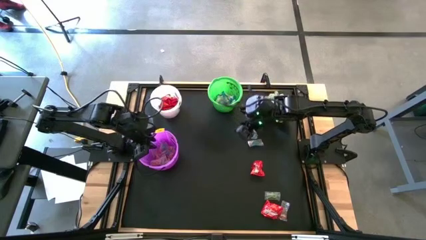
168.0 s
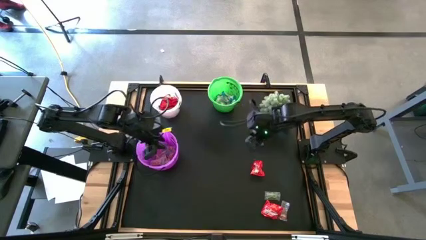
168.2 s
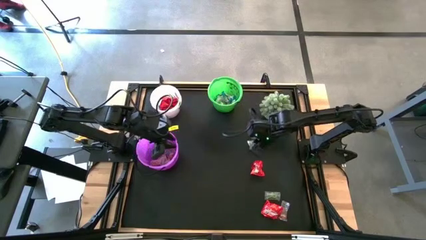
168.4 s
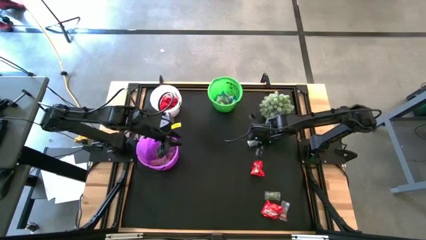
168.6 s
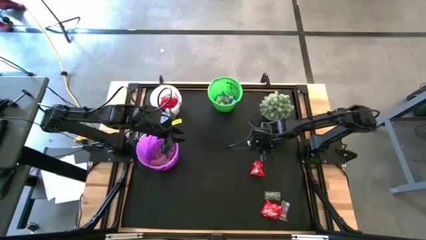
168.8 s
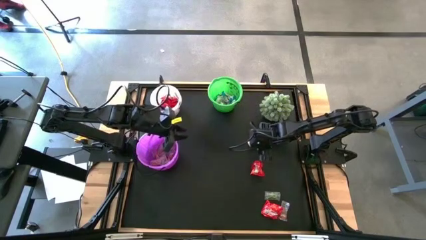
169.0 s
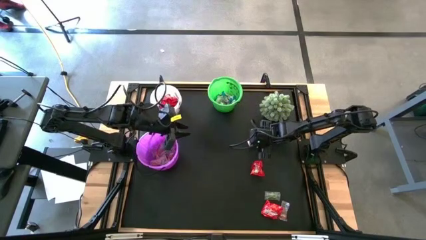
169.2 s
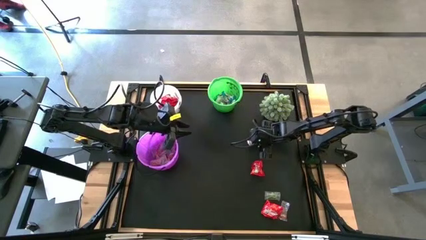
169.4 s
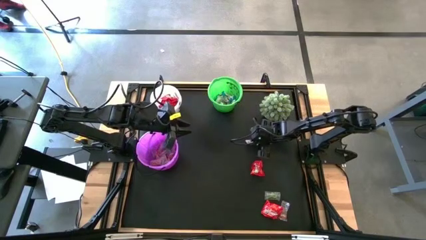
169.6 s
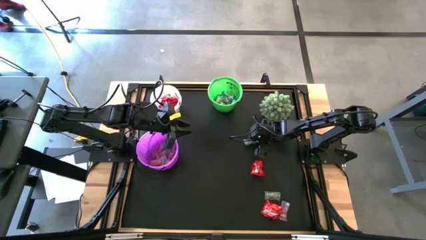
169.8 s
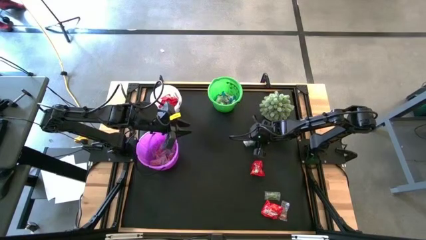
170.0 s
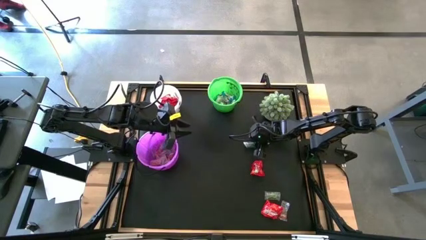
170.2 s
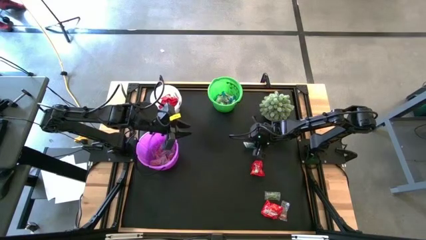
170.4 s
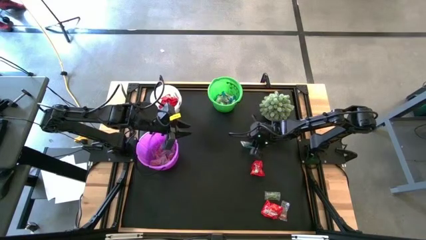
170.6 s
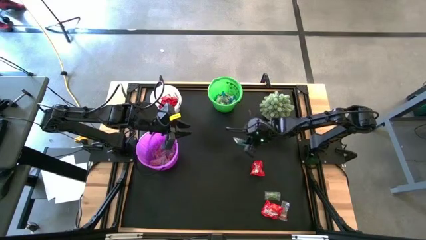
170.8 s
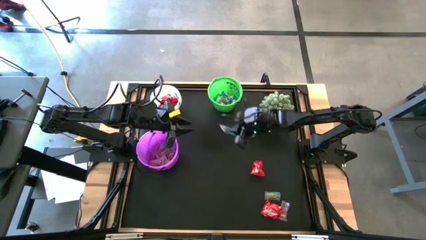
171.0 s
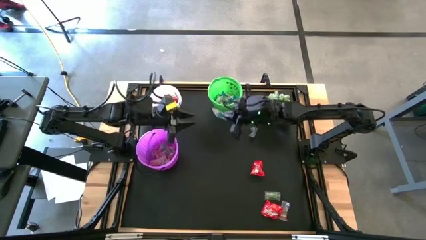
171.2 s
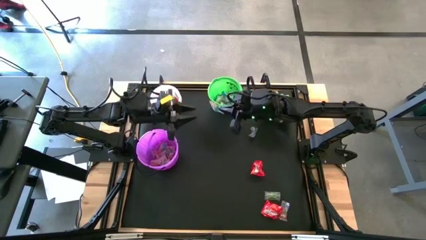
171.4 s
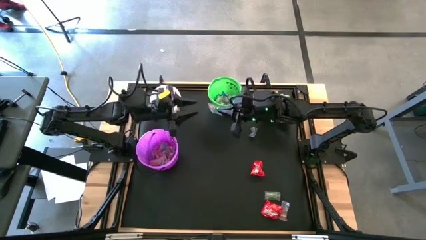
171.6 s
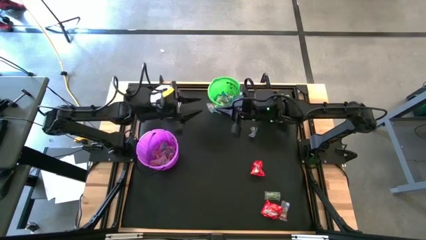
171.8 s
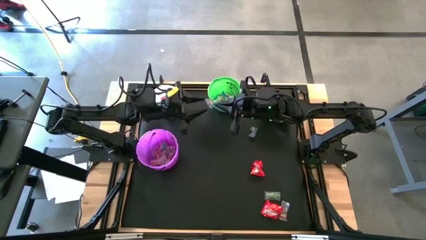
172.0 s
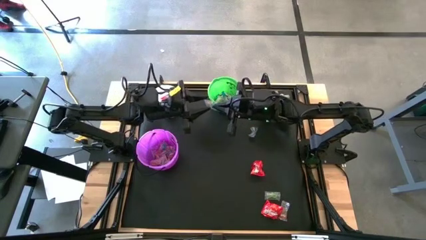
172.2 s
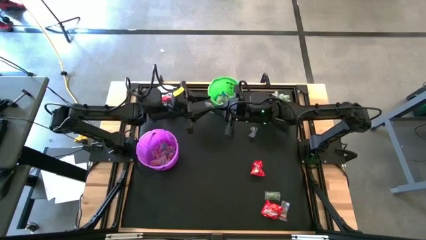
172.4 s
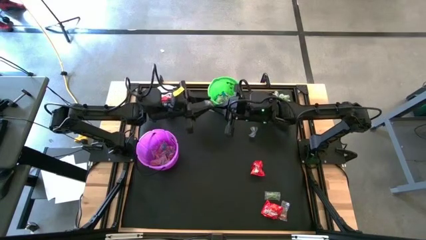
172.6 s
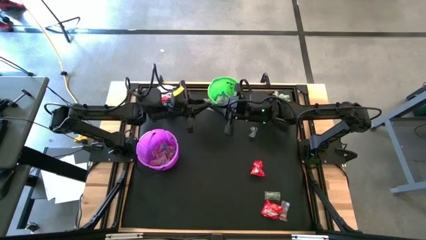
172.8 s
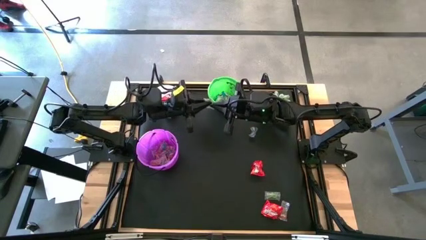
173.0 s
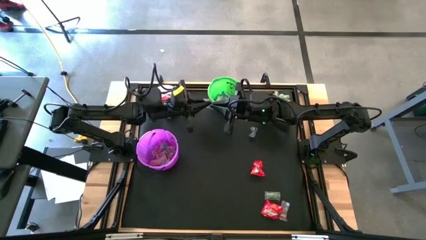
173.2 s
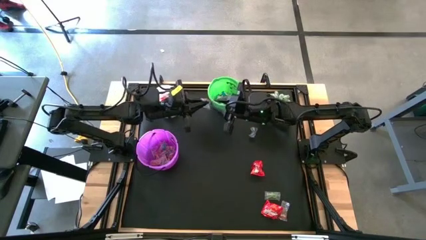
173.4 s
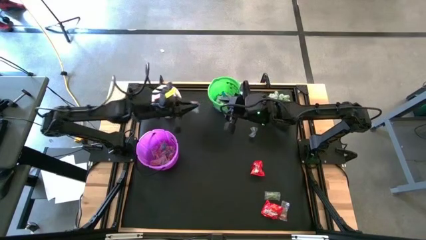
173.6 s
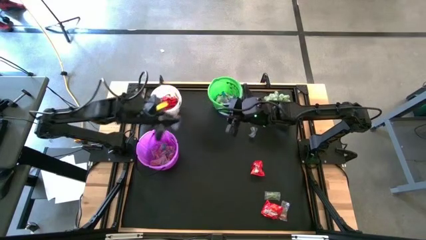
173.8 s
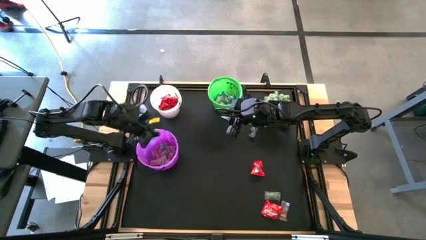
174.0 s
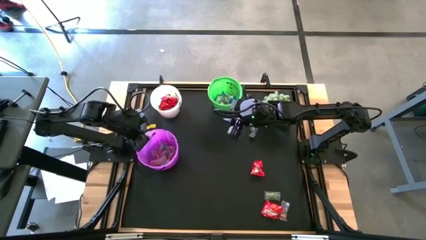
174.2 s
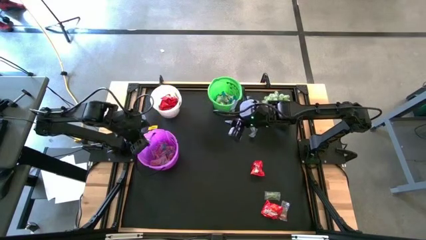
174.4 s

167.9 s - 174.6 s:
Task: Sort candy
Put the blue gummy into the violet bucket

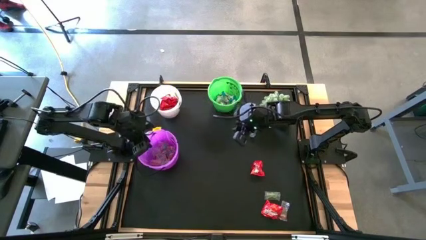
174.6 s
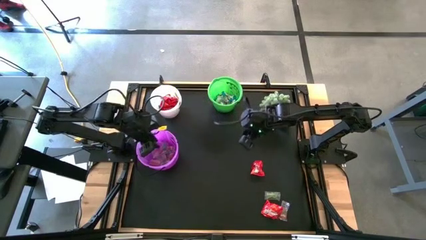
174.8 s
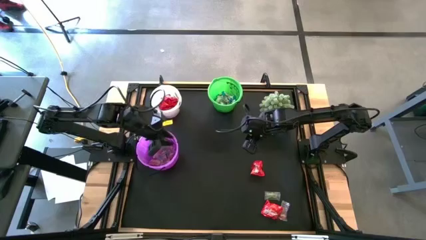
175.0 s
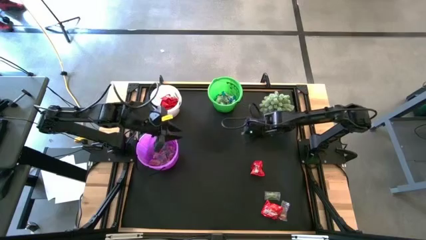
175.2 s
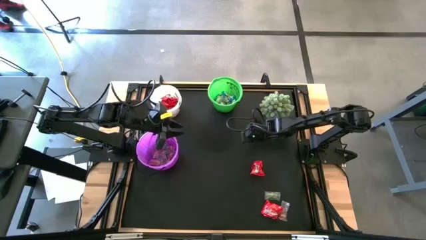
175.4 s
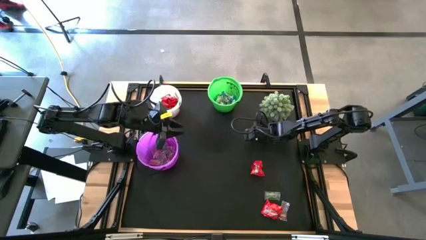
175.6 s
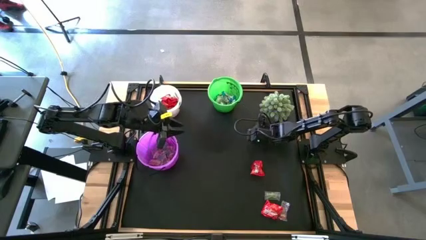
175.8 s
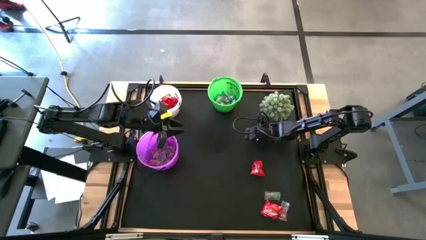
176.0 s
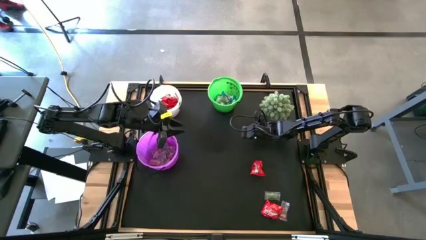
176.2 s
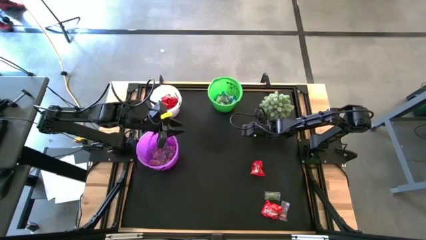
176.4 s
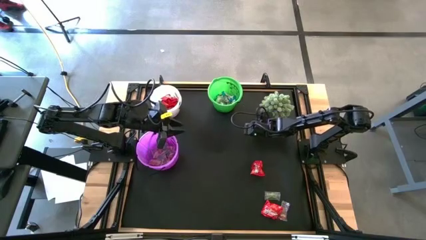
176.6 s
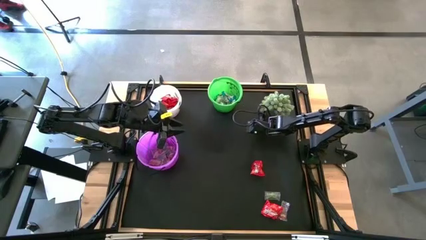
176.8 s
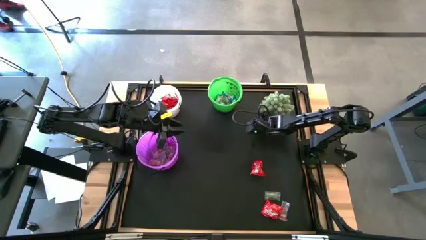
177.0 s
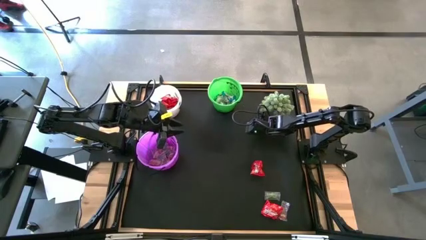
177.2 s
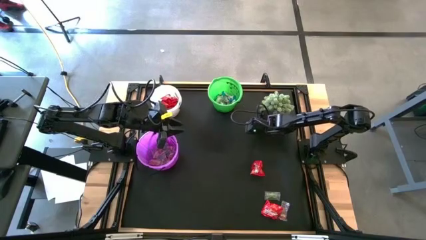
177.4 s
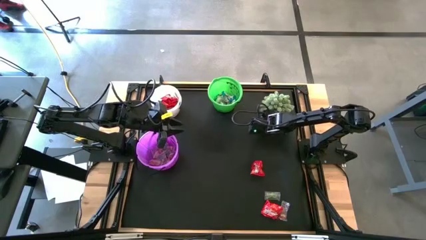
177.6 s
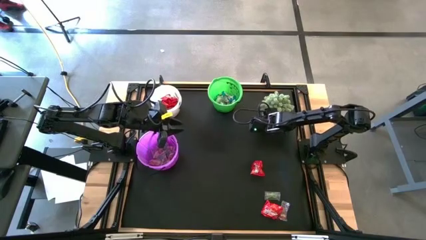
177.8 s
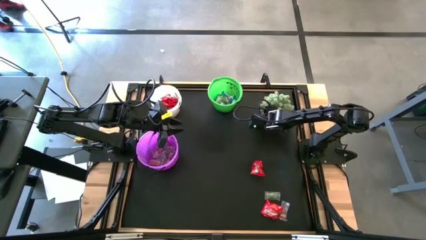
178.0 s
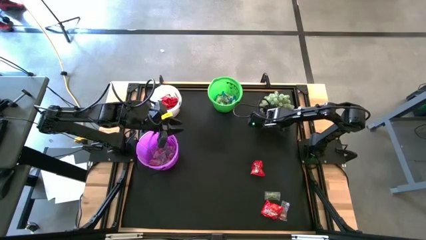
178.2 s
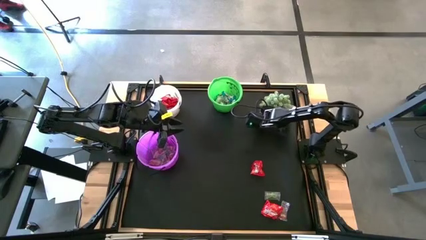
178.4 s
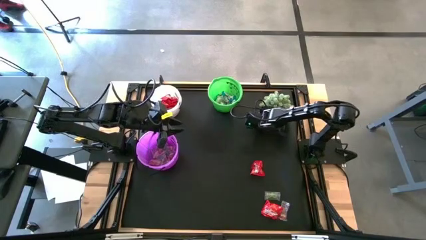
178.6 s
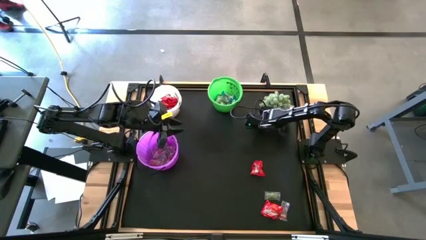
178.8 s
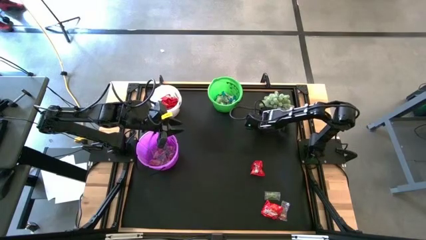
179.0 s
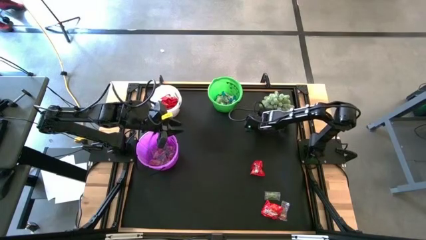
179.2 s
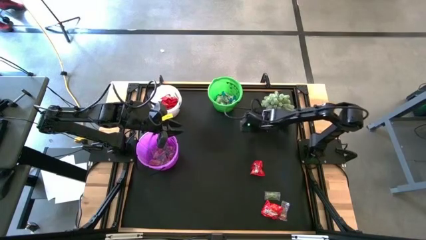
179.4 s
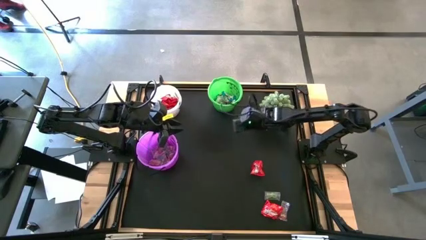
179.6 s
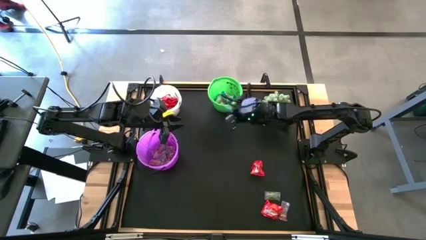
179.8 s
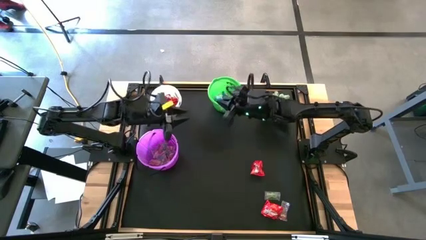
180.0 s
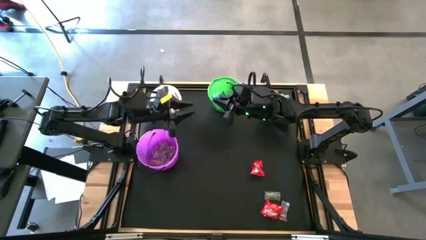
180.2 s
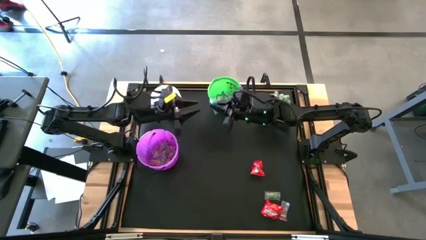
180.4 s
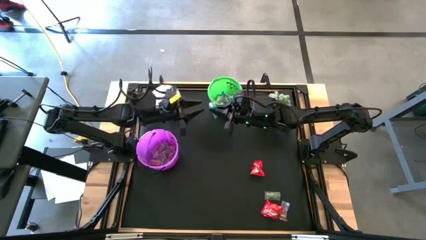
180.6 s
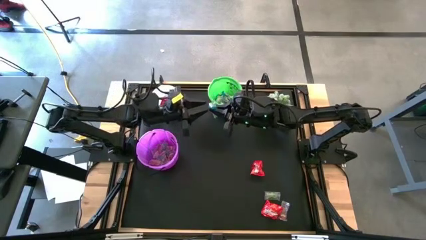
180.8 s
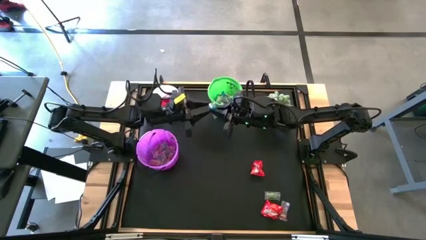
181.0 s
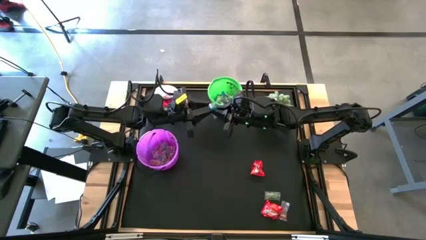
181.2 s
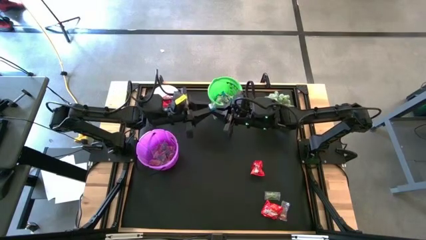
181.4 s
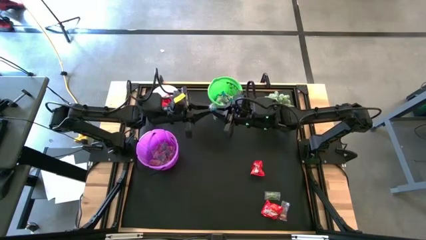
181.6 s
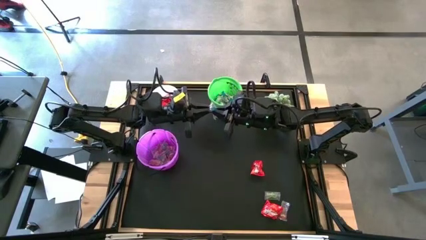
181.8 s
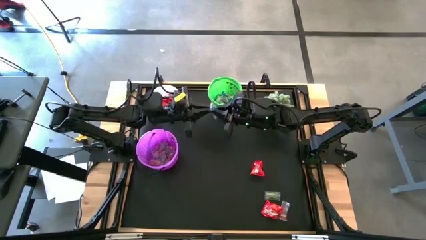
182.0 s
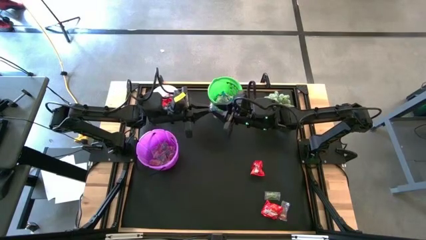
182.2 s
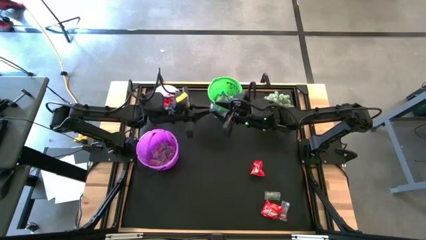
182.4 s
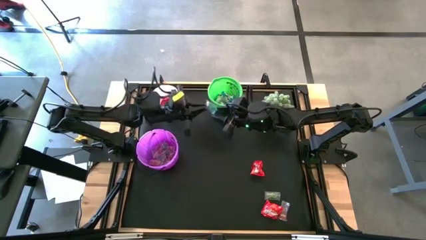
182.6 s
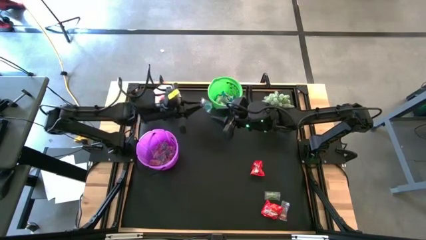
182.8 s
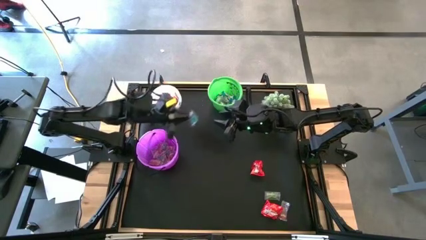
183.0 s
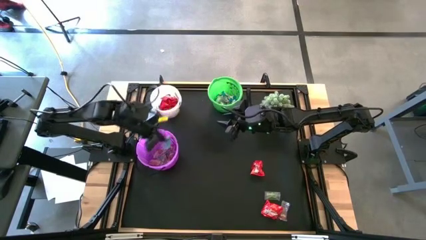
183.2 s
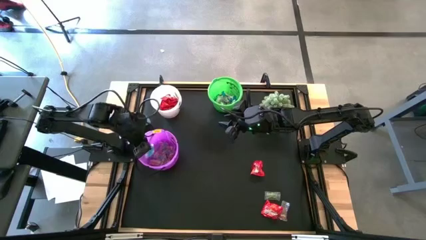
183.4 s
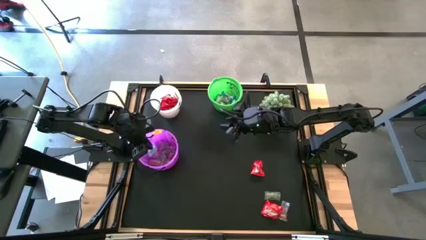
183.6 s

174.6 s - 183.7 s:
Put the blue gummy into the violet bucket
